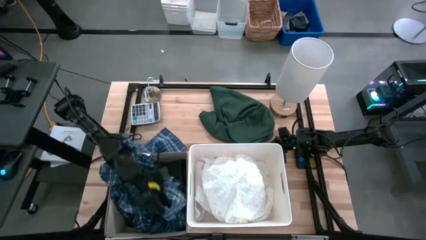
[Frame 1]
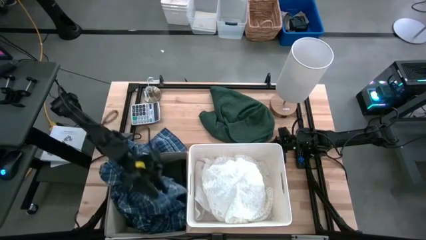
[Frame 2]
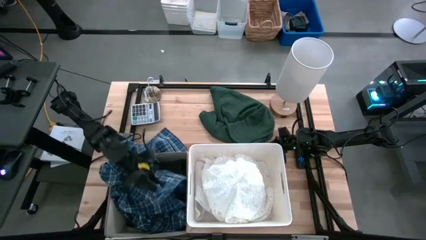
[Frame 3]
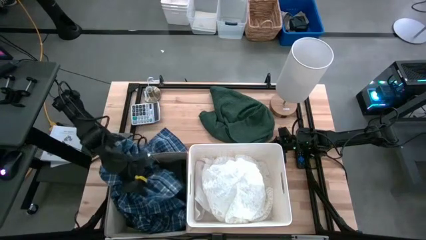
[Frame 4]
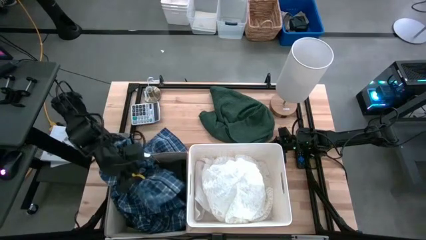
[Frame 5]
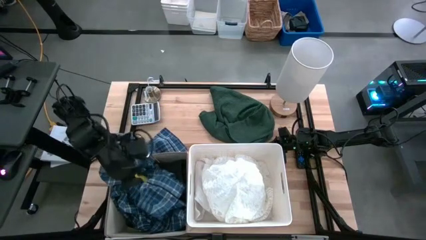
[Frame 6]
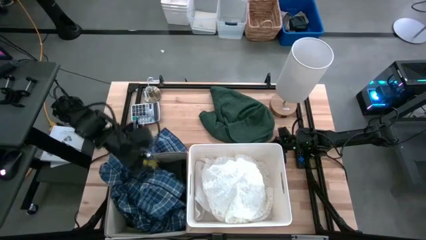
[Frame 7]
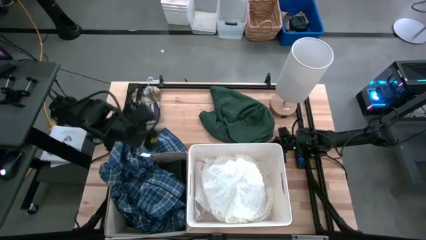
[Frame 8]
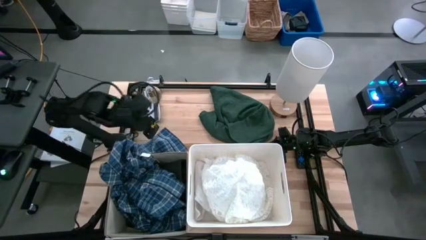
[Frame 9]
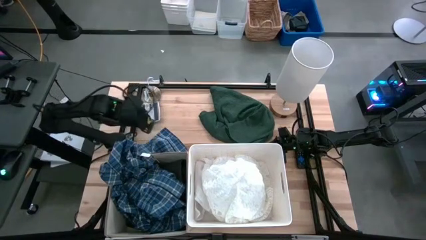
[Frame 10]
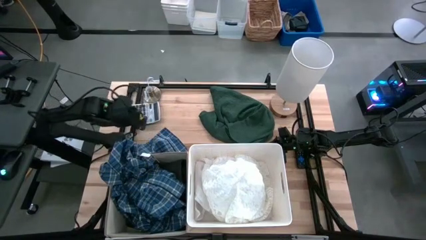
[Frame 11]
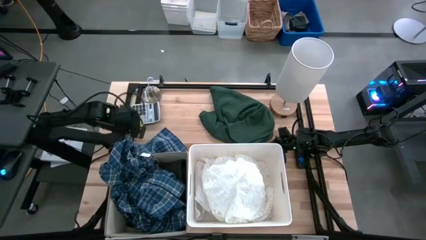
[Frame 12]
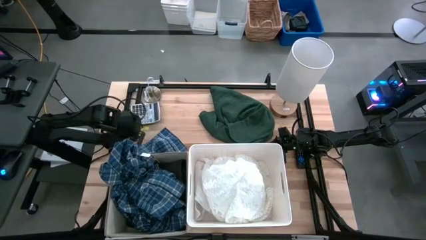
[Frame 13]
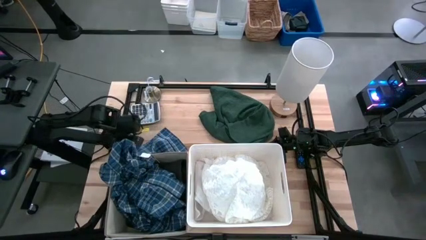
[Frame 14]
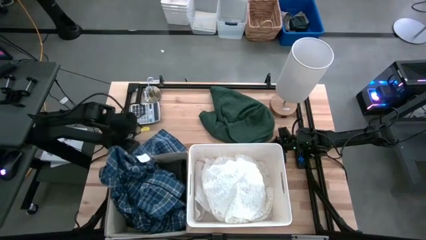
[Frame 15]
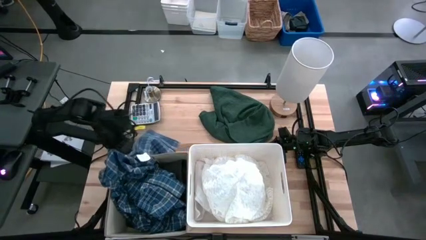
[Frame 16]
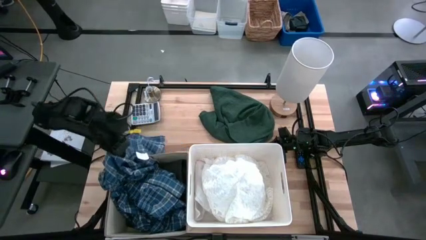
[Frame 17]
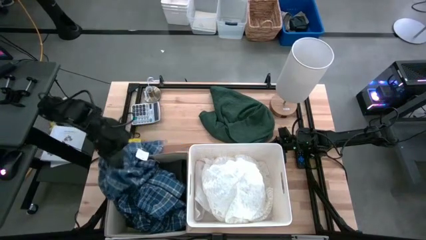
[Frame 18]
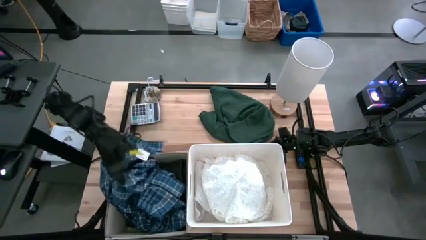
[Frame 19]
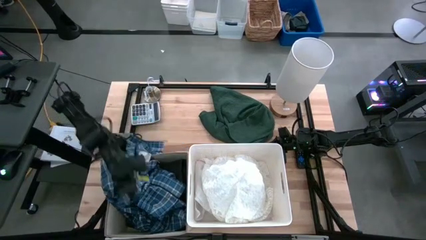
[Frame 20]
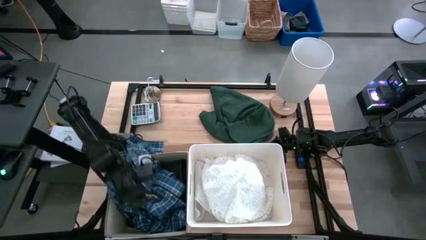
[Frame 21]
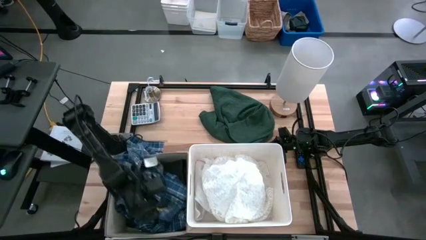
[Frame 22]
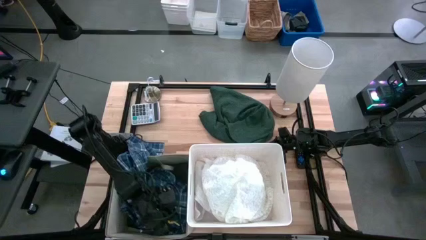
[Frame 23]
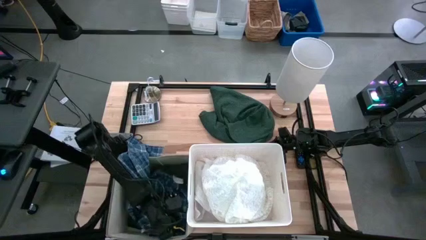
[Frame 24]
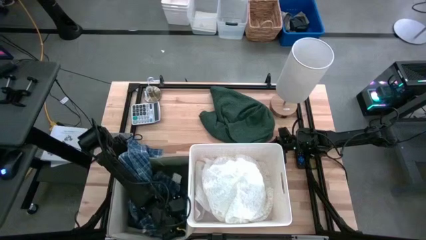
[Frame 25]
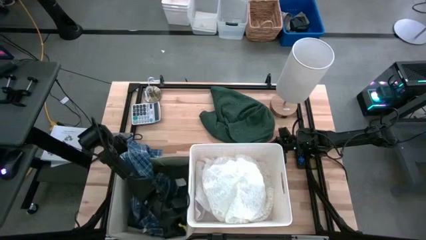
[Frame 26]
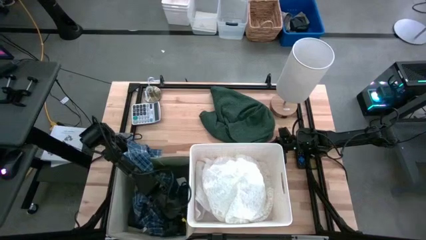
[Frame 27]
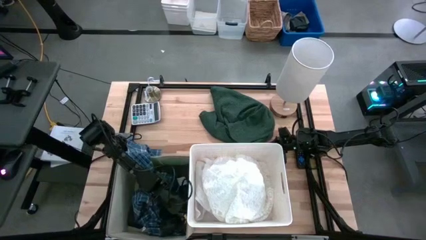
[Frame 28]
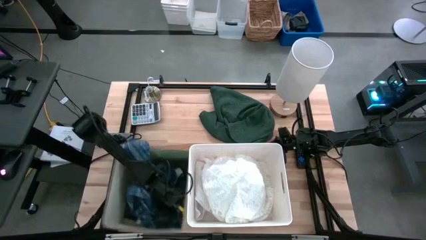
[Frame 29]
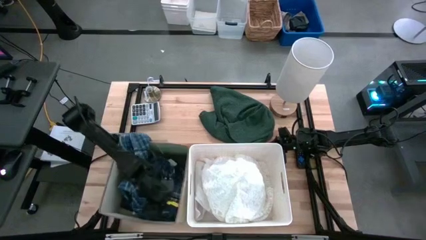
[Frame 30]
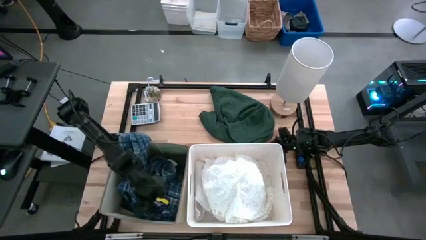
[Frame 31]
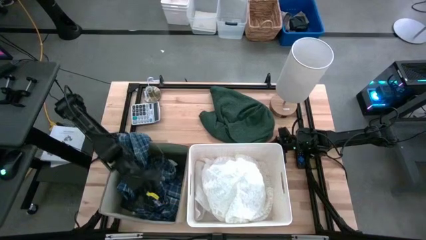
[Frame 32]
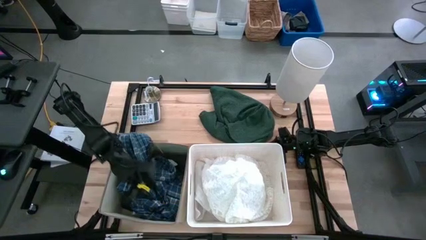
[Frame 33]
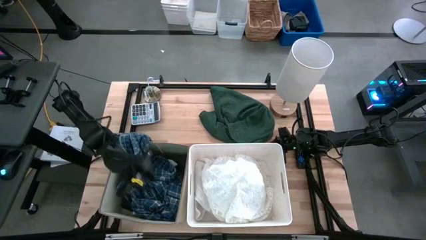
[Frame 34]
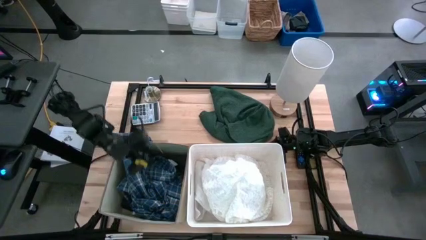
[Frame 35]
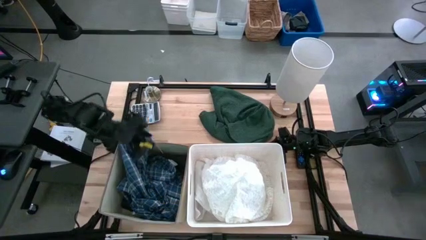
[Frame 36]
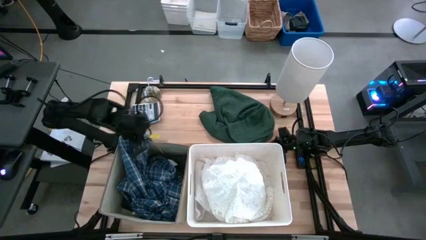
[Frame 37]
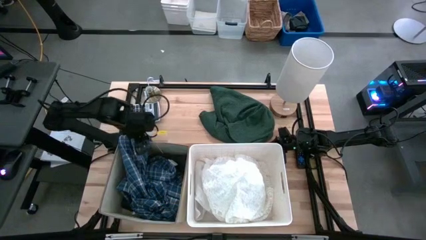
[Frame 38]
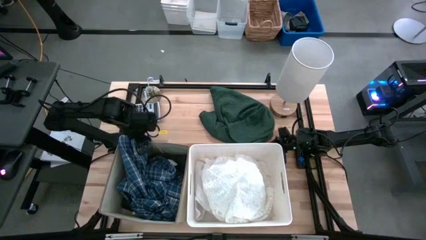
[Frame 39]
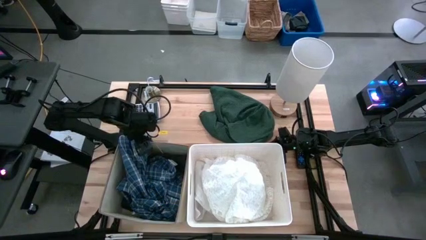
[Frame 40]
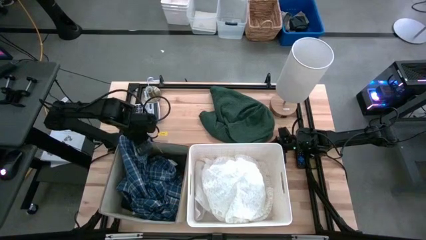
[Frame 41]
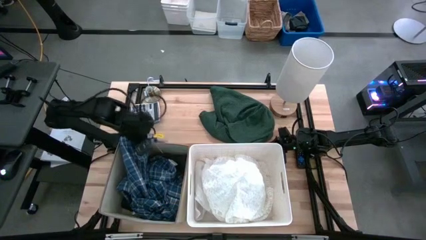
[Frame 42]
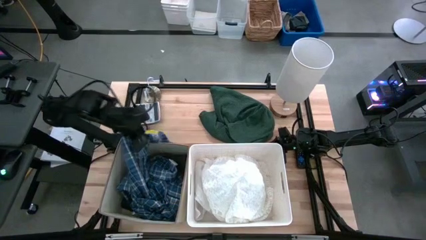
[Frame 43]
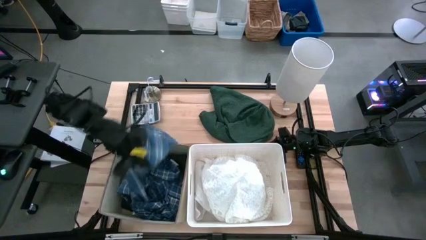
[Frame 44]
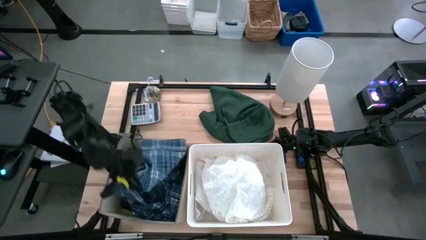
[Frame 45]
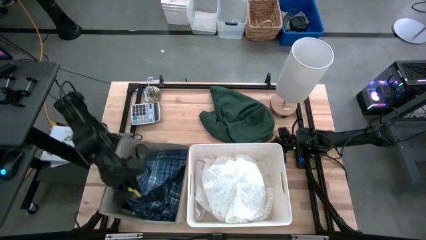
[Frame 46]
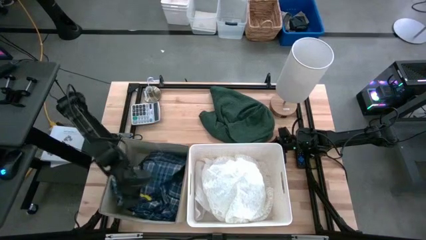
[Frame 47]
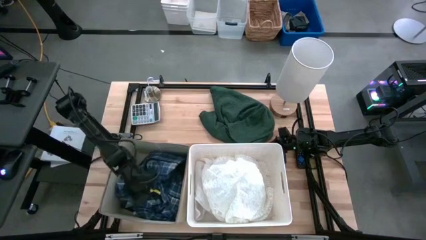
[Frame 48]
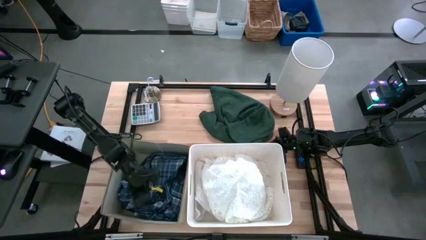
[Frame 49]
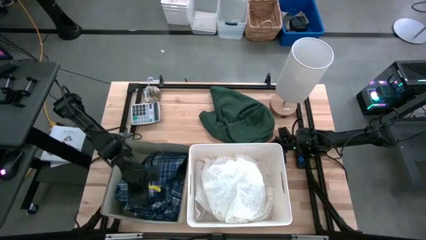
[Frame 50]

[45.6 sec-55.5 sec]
Task: Sort clothes
Put the blue checkered polo into the beige laundry organizer

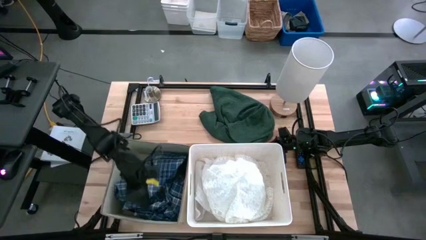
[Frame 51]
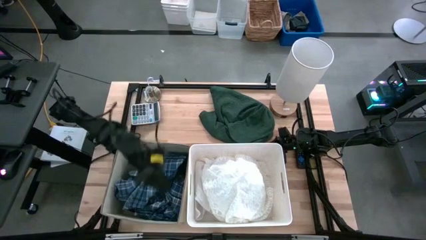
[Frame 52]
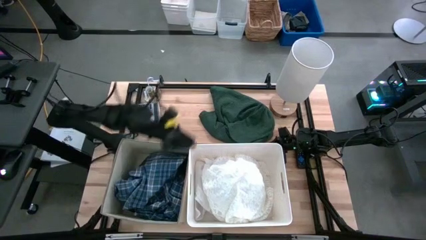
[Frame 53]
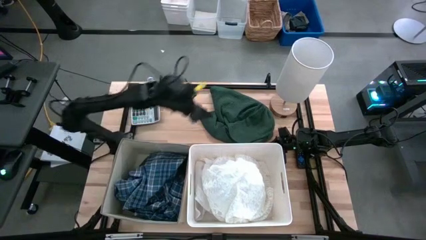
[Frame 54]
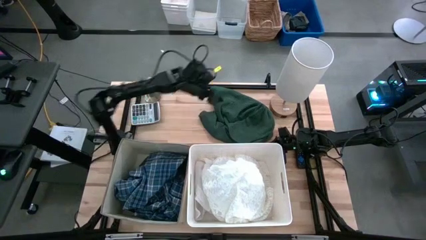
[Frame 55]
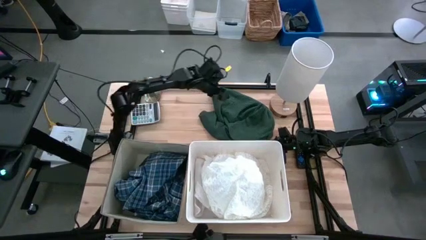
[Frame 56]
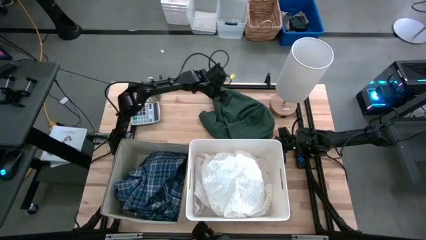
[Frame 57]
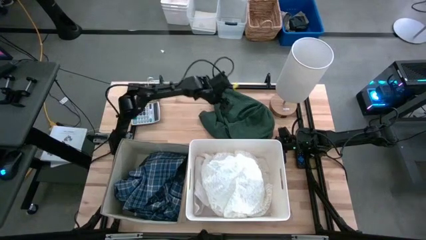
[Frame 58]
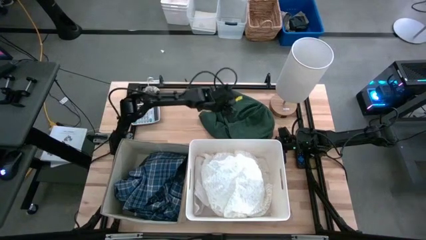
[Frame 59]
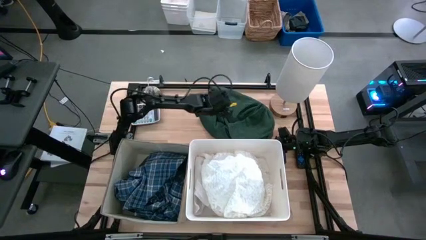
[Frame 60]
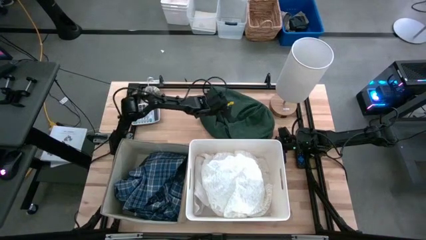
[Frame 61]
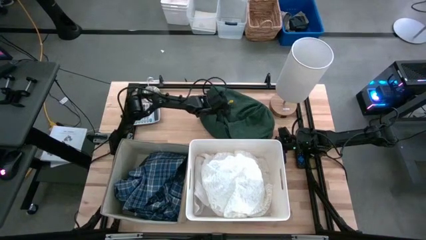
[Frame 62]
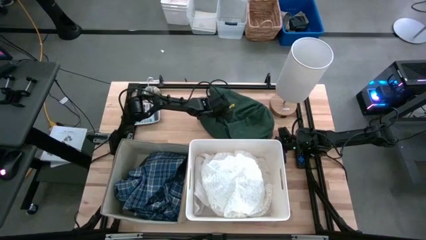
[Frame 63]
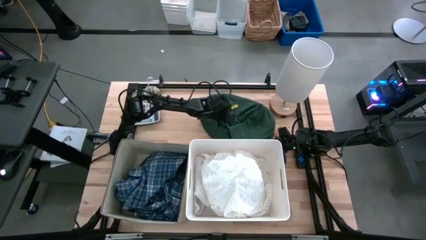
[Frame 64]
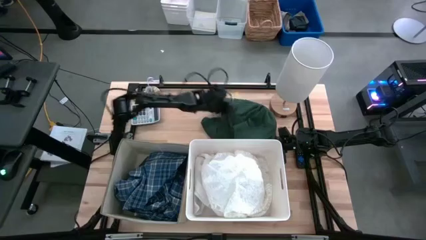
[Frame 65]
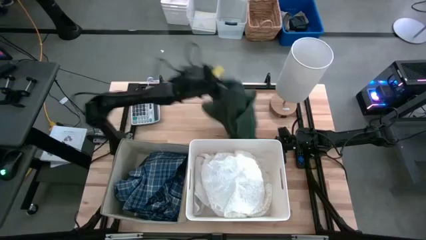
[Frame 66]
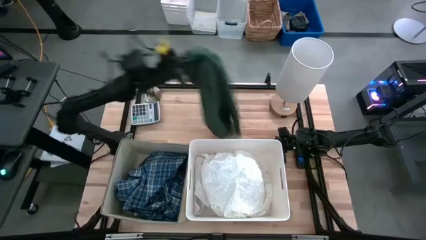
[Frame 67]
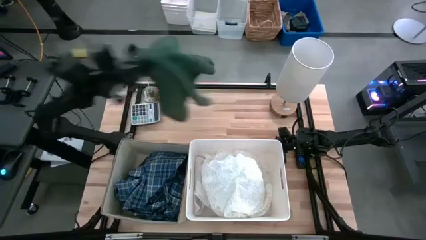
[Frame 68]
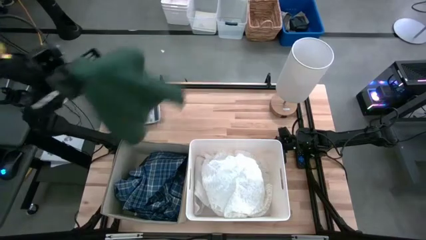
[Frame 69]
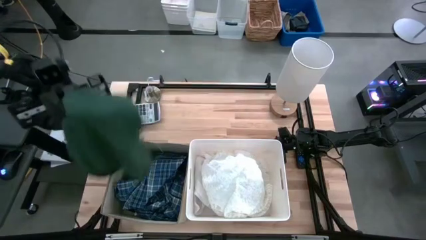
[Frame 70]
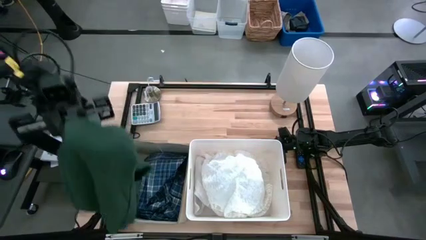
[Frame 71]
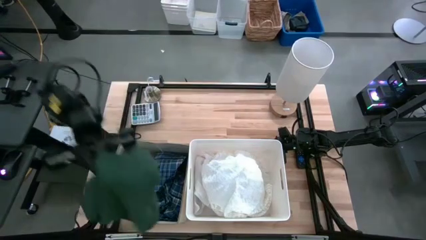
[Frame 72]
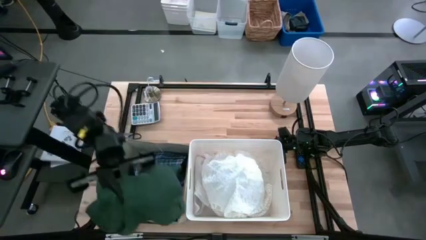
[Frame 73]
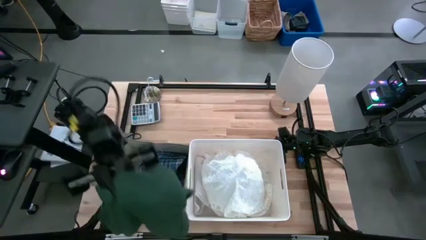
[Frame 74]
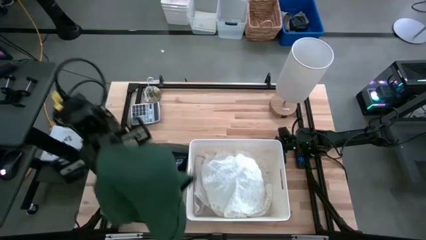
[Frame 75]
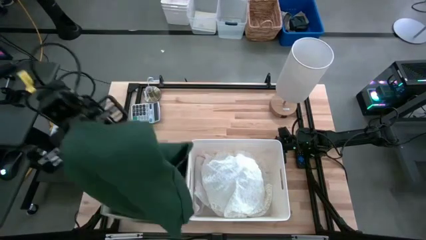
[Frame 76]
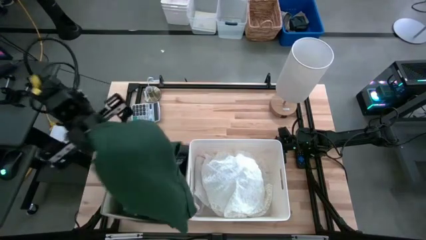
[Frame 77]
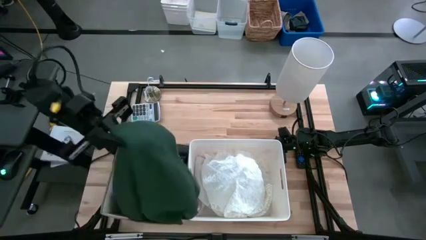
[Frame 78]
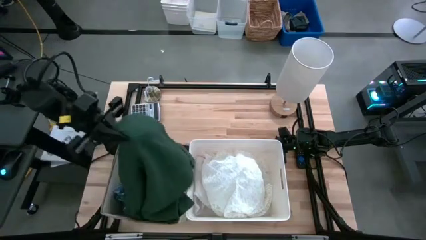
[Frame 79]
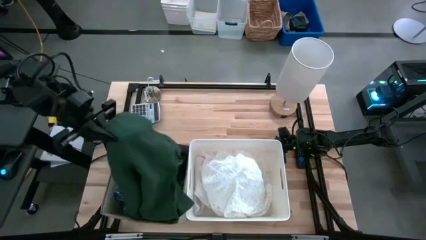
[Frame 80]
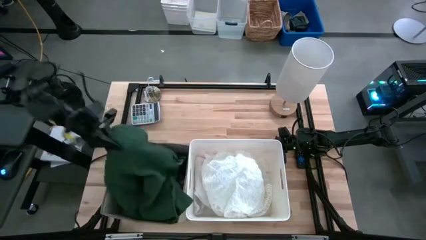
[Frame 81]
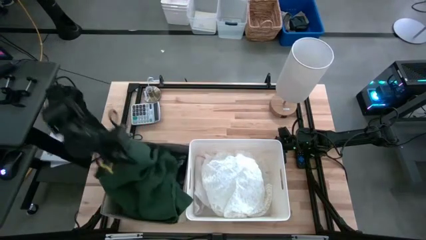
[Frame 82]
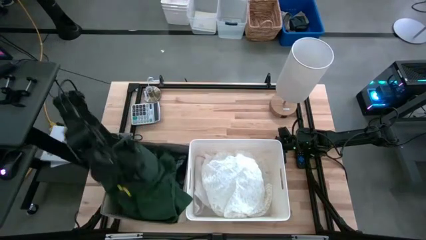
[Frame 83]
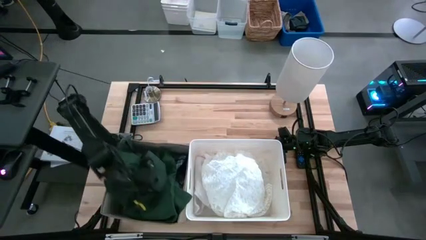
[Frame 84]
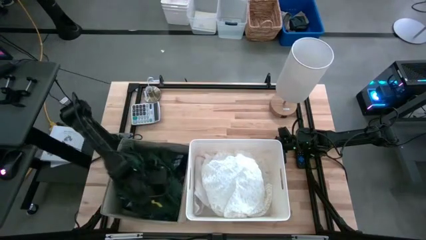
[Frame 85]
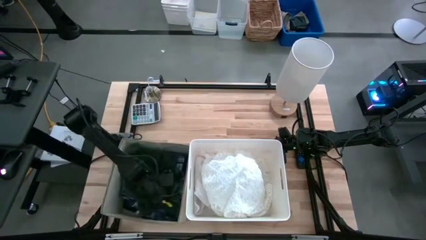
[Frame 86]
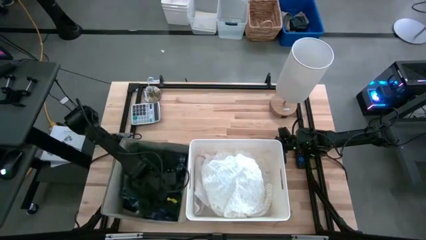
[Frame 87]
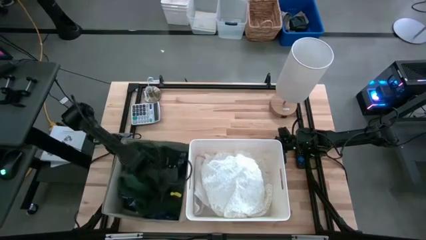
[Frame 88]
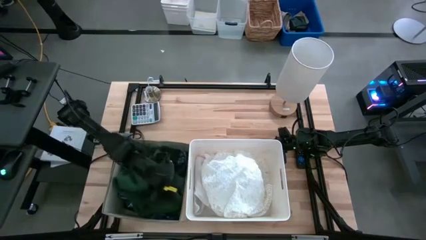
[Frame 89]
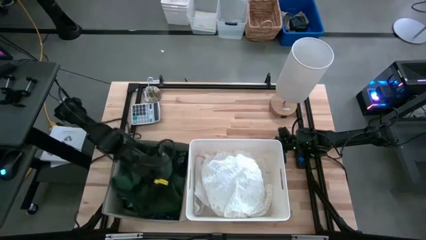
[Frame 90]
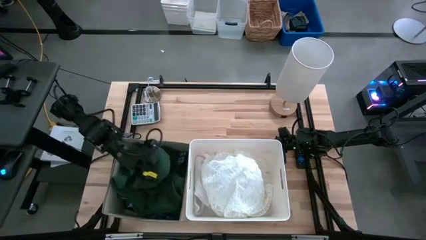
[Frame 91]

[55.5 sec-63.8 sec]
Put the green shirt into the white laundry organizer
